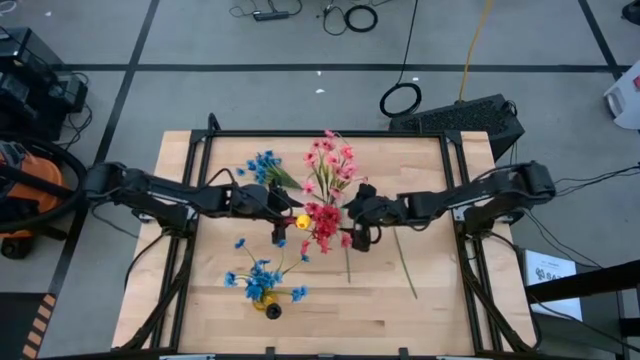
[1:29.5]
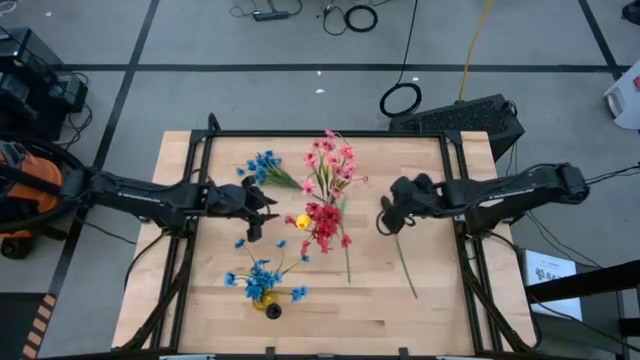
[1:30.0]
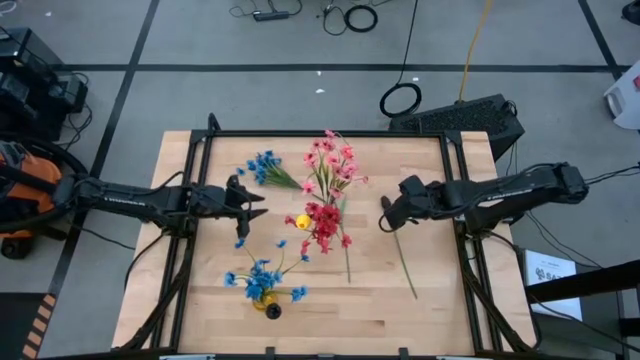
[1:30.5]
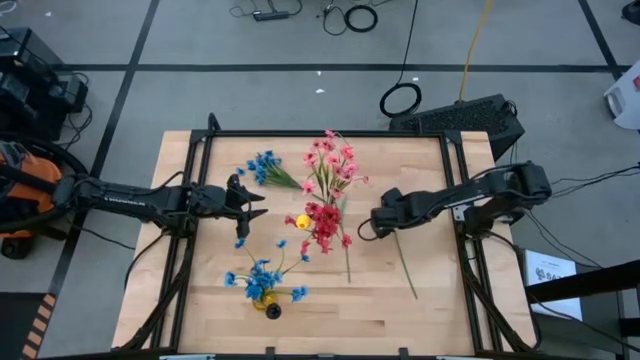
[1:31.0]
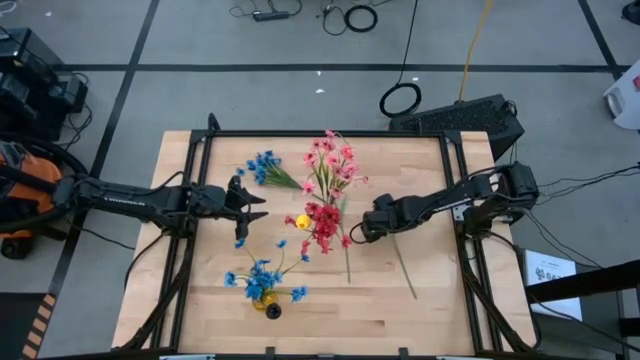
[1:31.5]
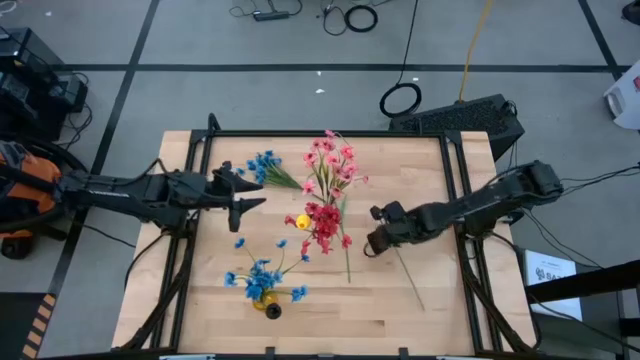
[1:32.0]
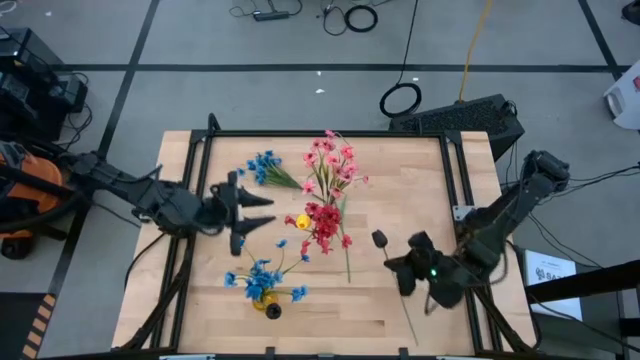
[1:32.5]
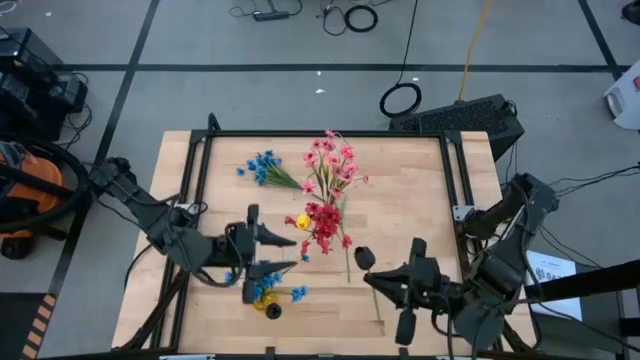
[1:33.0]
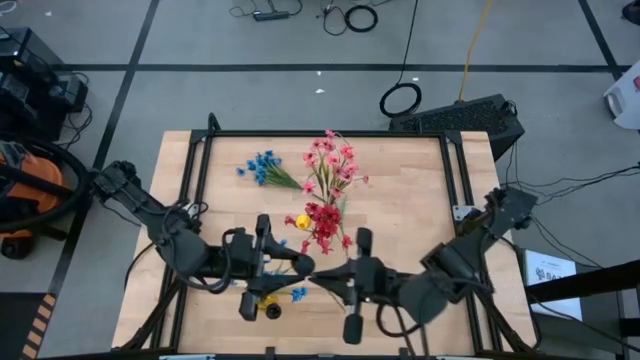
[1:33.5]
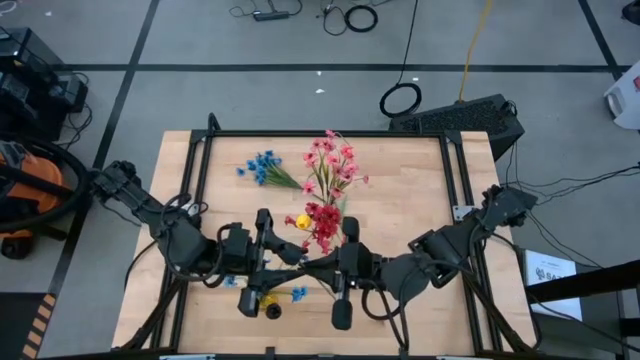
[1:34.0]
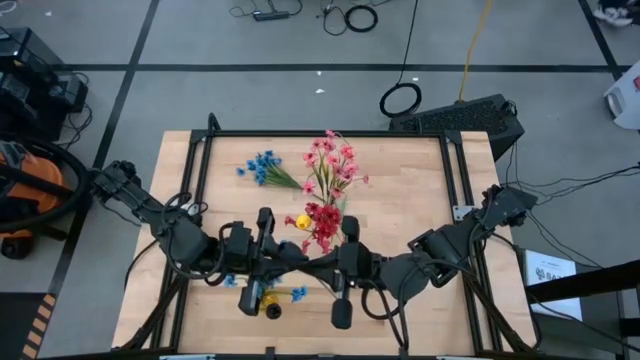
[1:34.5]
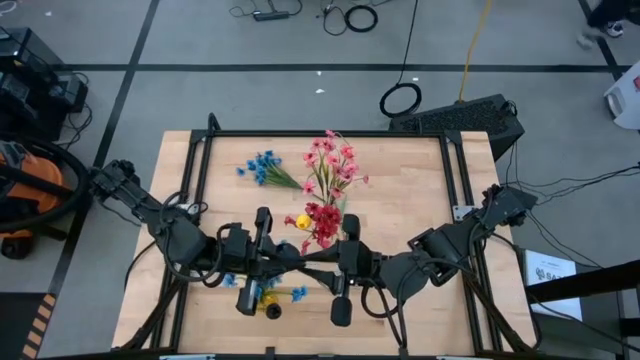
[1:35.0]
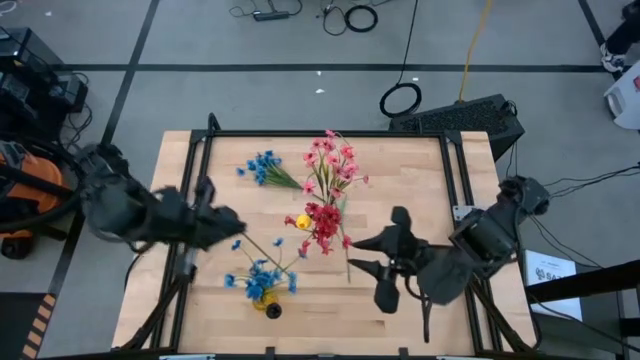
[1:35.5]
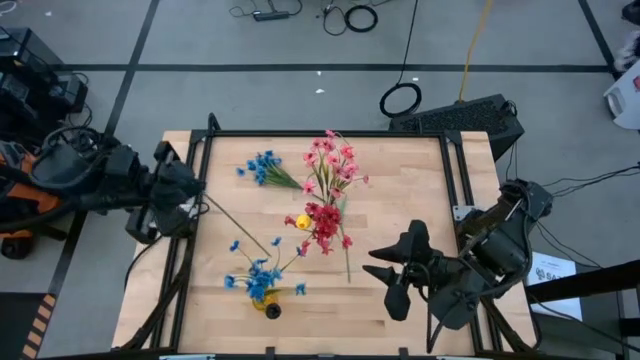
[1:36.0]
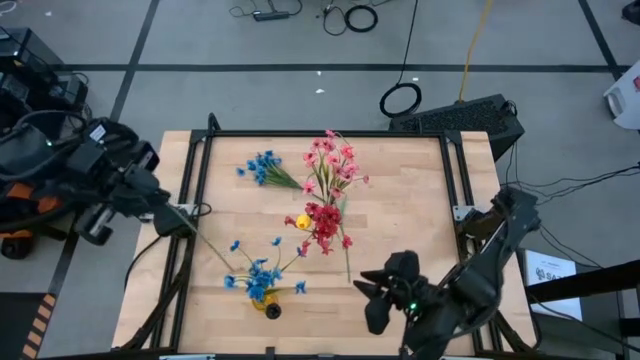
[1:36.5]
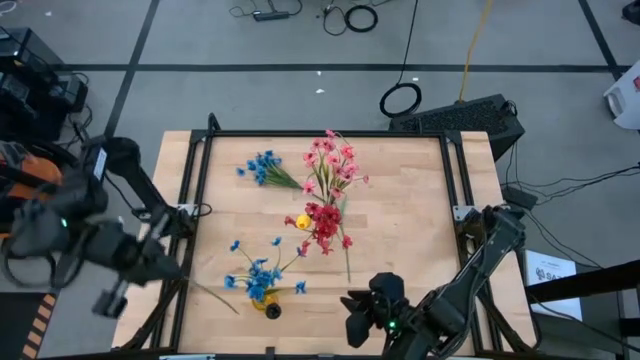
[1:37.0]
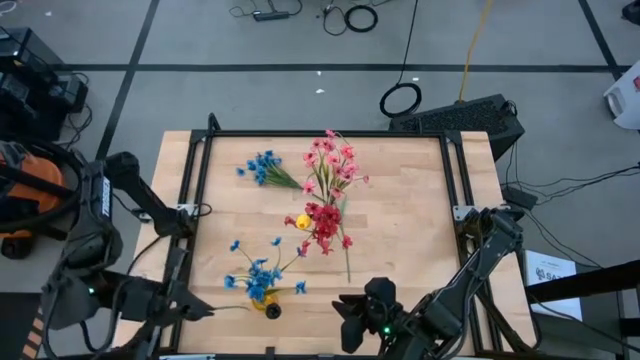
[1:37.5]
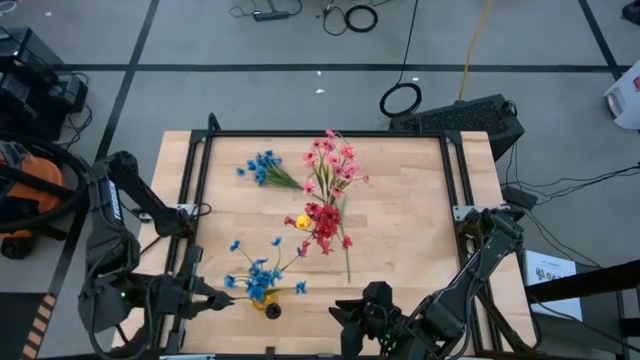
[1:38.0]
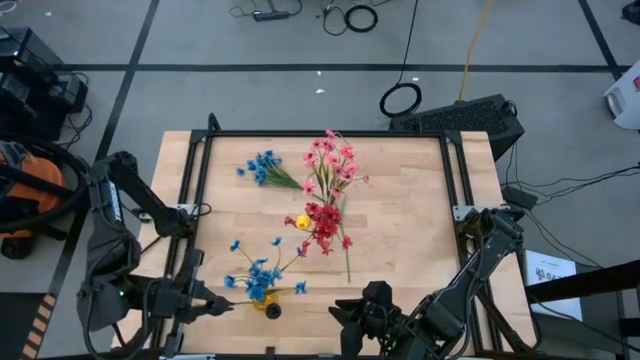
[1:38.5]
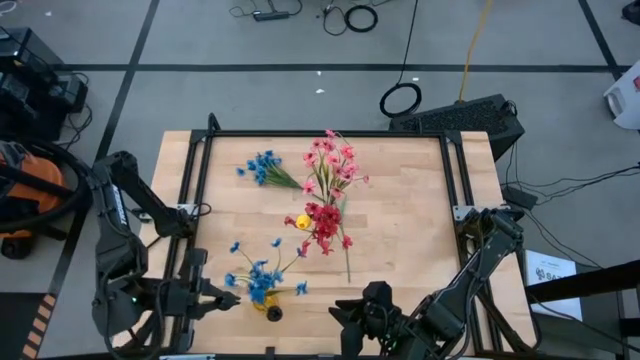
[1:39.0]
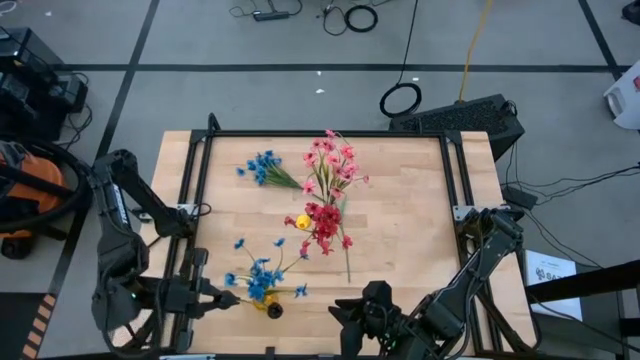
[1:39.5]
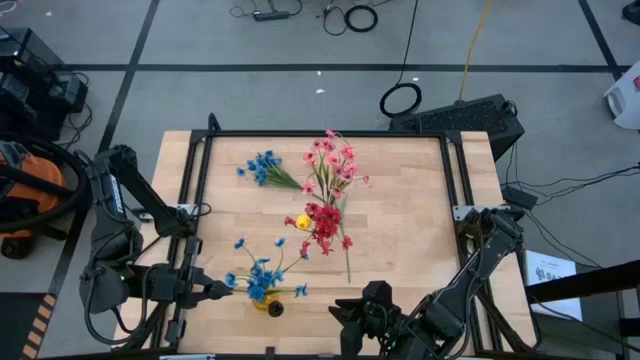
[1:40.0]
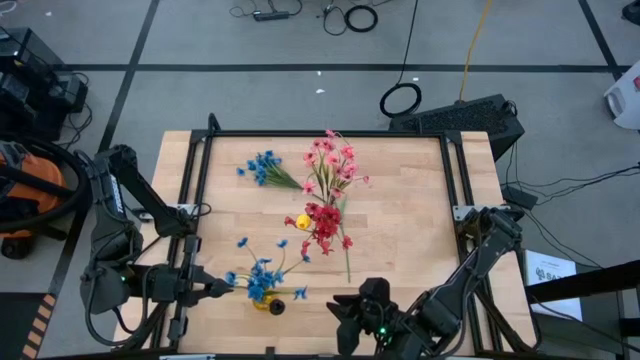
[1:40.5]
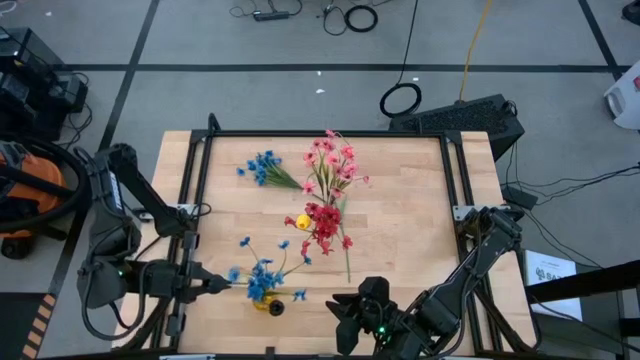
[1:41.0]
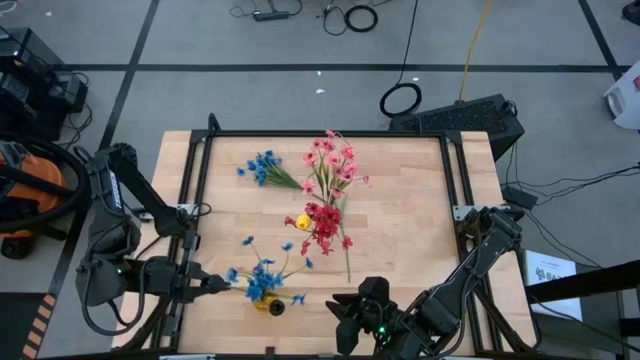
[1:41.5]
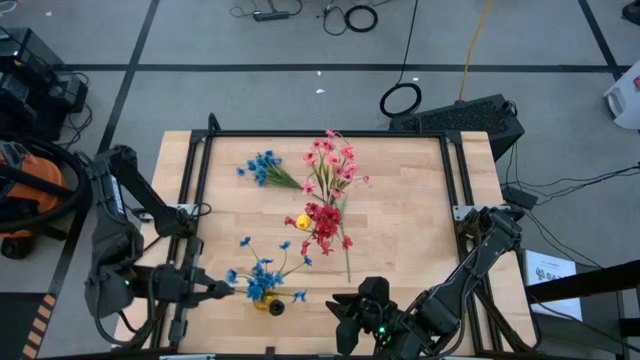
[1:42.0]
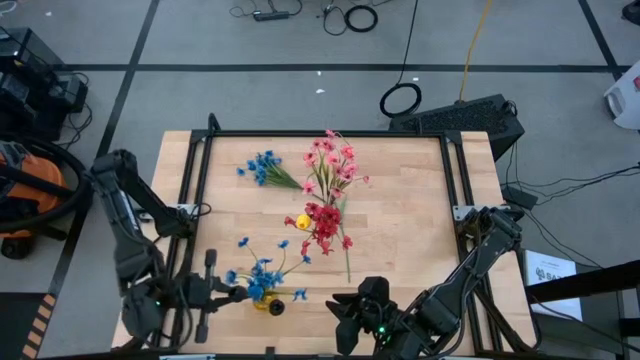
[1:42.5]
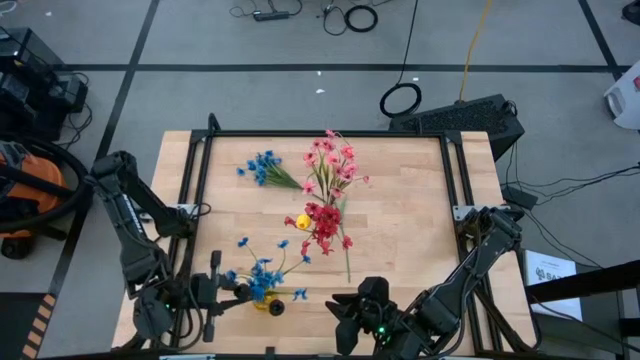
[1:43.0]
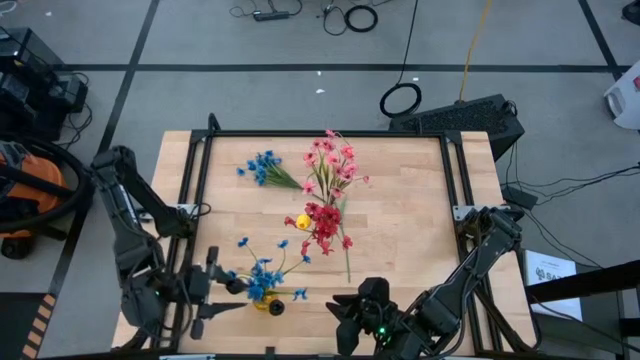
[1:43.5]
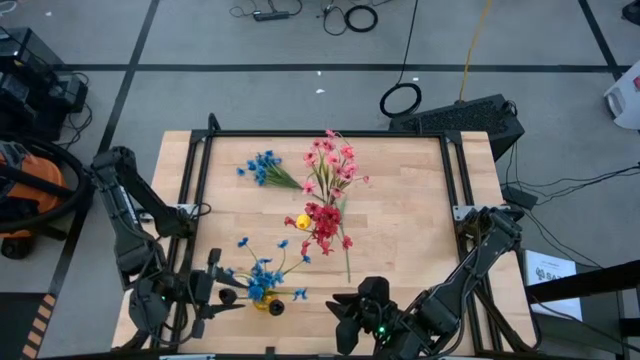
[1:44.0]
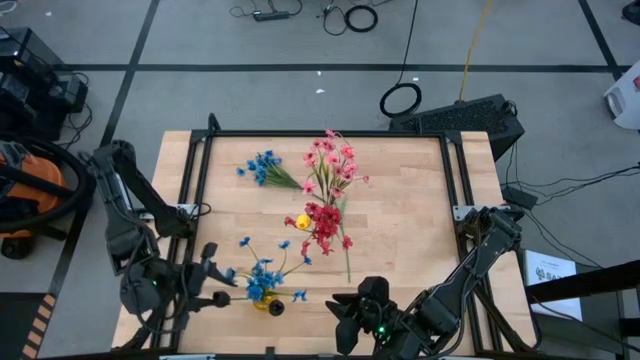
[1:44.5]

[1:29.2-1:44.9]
Task: Sort flowers into vase by color
Put the black tulip into the yellow vase

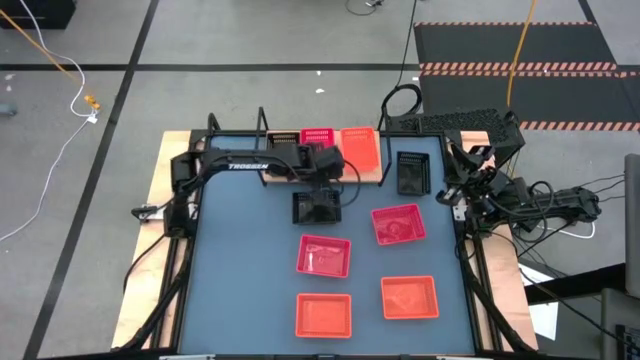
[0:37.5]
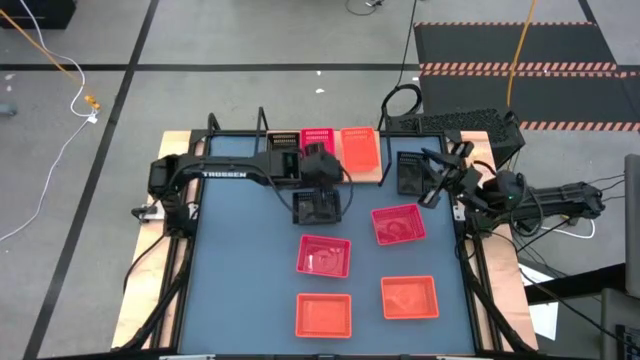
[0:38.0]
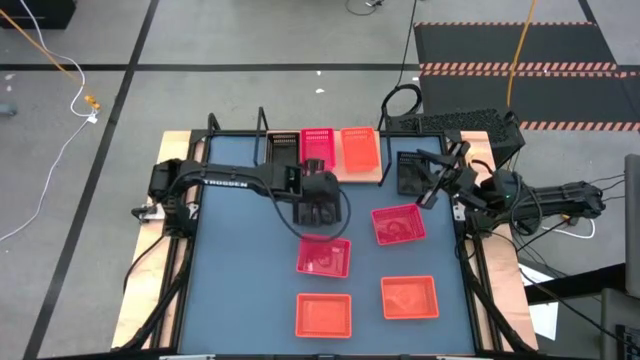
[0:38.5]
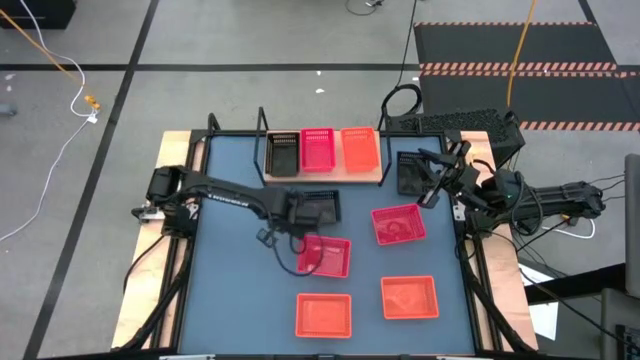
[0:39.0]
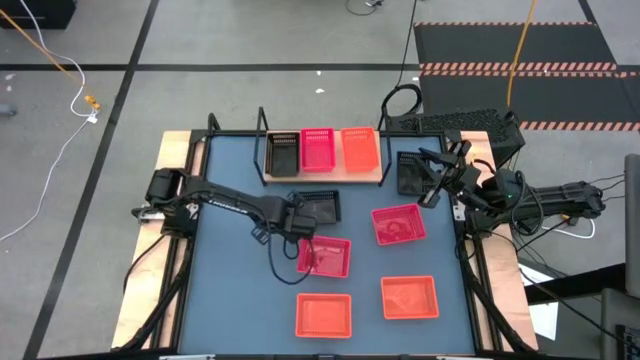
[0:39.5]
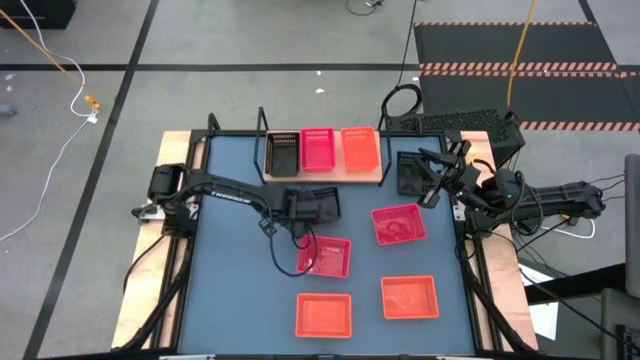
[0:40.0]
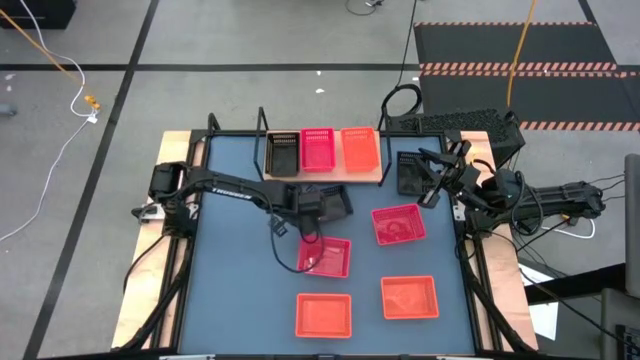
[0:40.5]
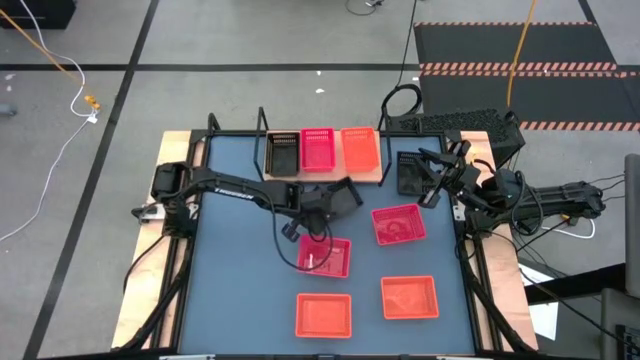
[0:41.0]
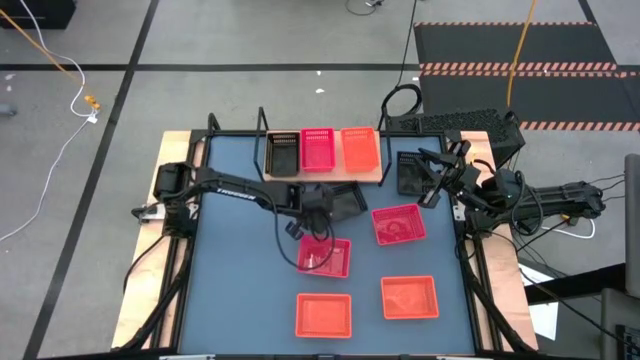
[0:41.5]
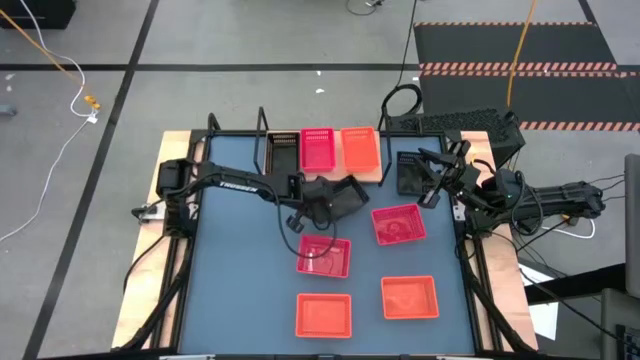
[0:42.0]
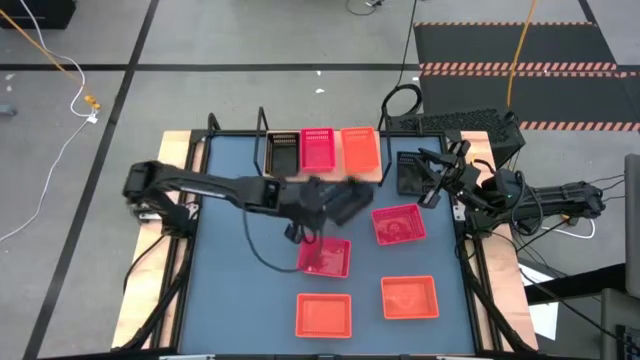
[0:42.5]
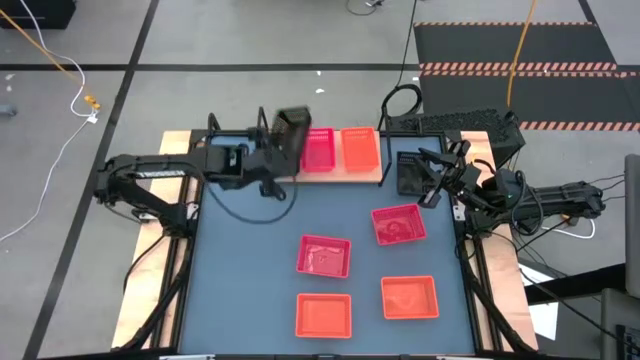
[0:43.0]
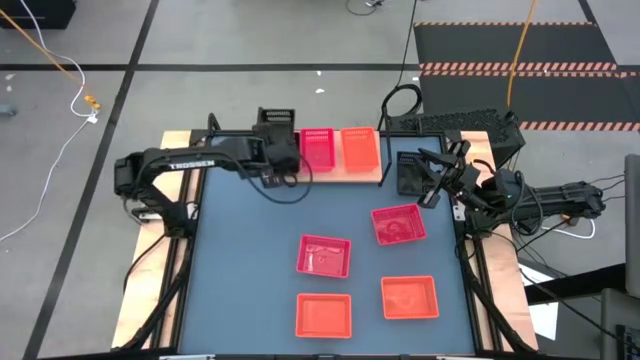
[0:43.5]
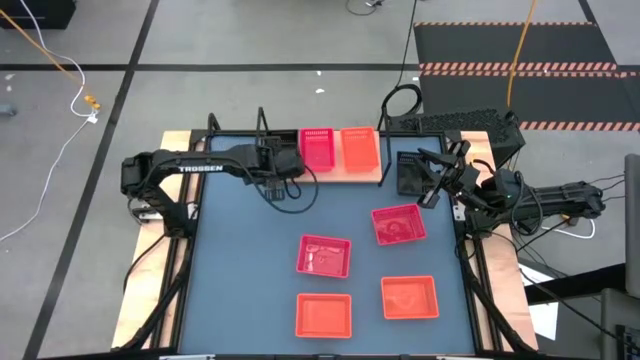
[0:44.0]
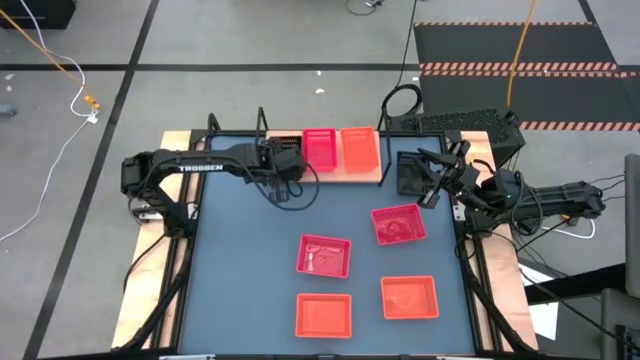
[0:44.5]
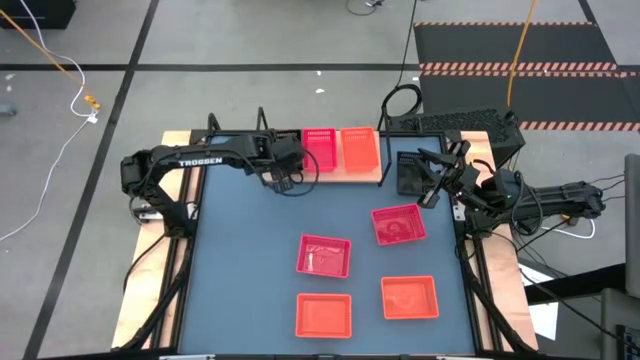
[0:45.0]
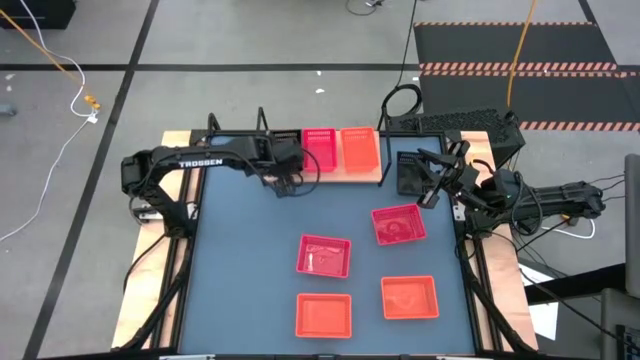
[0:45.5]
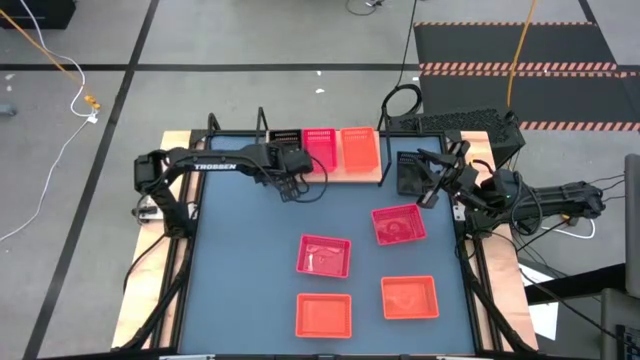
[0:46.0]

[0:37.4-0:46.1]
Task: Stack baskets on shelf by color
Stack the left black bin on top of the other black bin on the shelf
